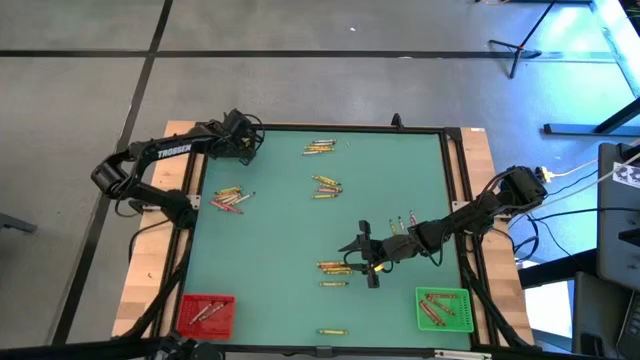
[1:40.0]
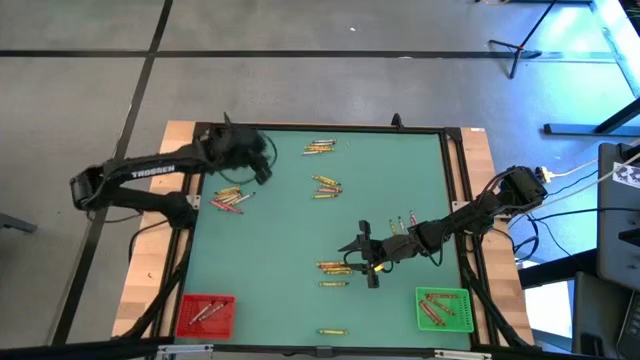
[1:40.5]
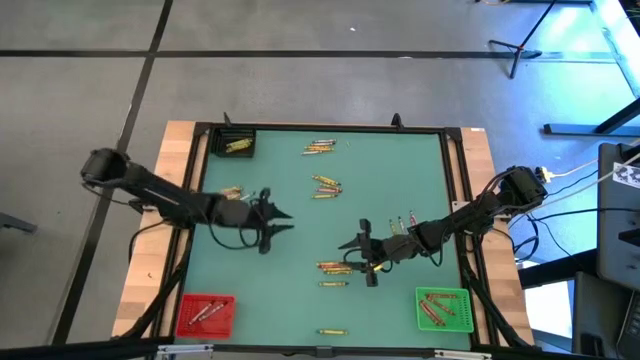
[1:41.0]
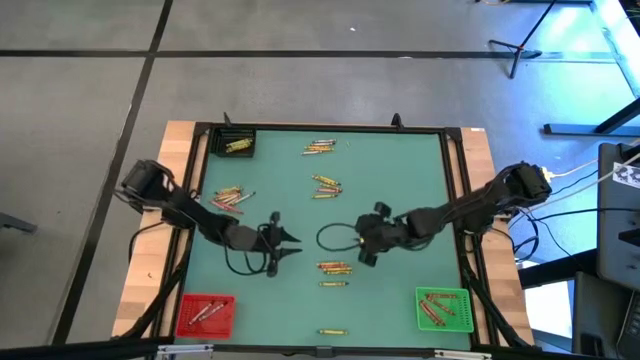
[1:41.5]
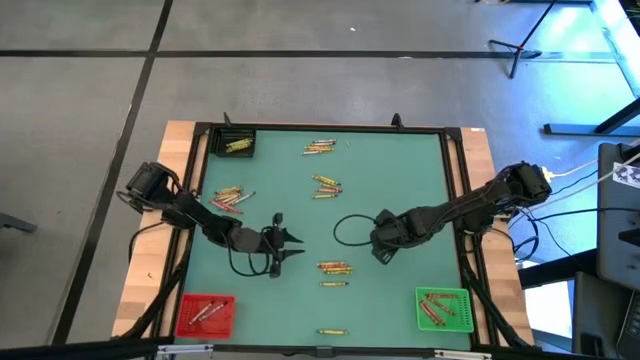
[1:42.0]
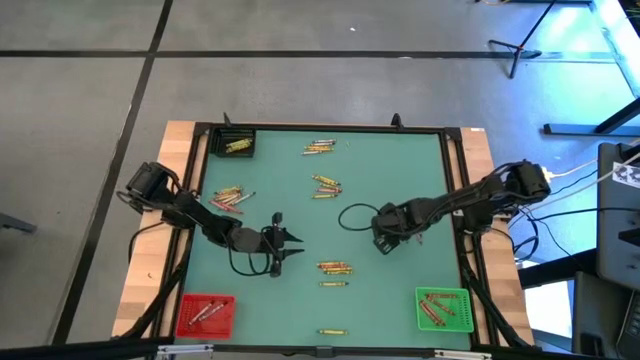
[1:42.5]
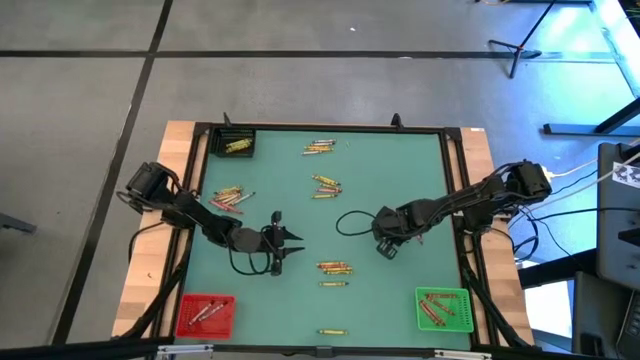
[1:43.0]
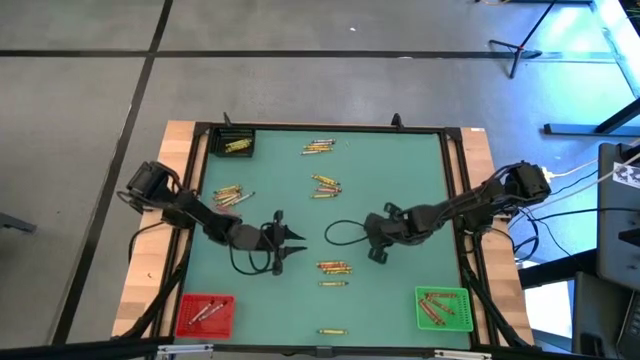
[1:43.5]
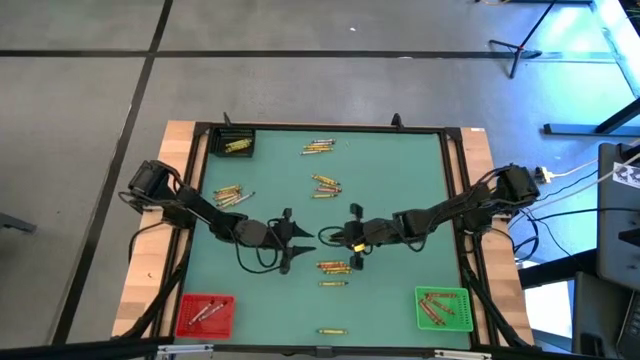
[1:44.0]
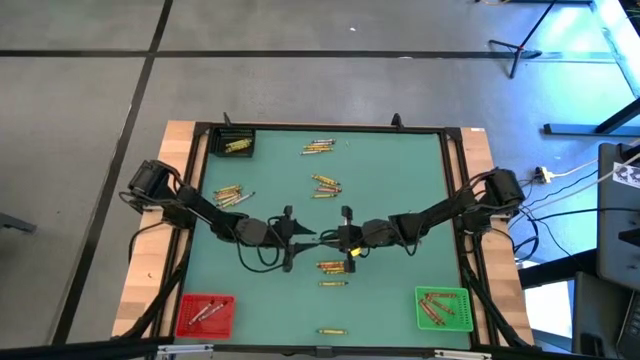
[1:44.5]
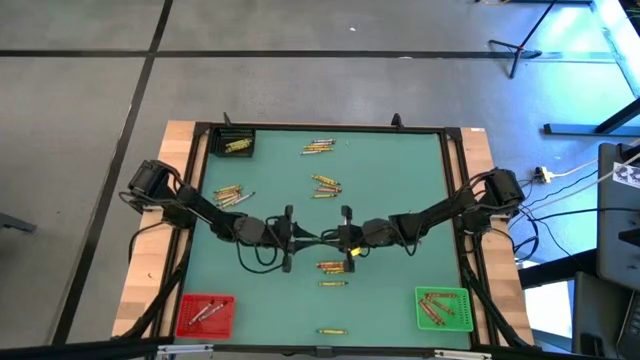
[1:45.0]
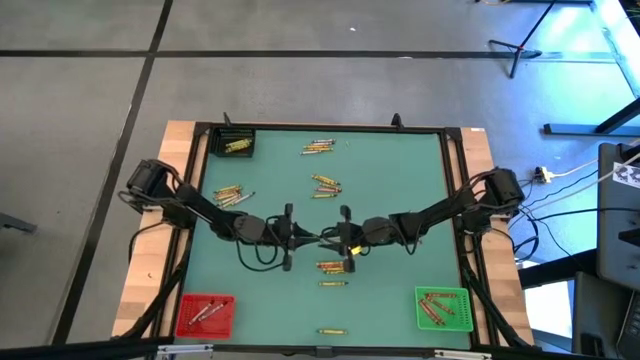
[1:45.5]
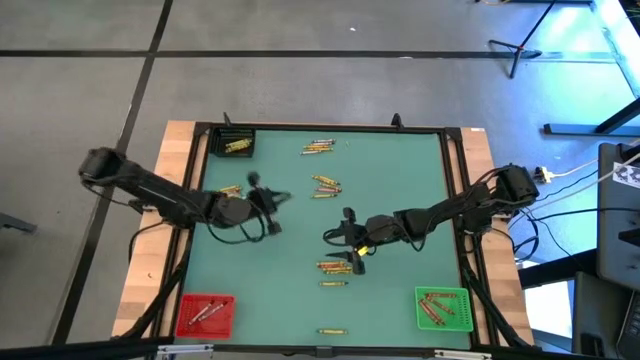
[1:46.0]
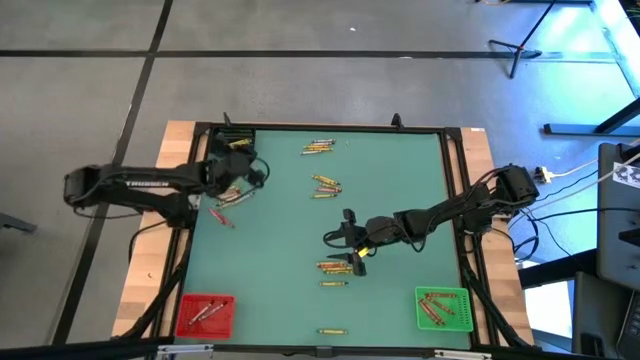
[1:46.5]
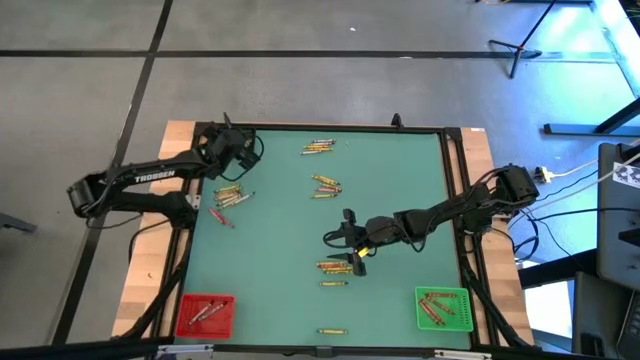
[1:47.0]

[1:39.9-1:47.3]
Task: Sort crayons
Put the green crayon into the black bin

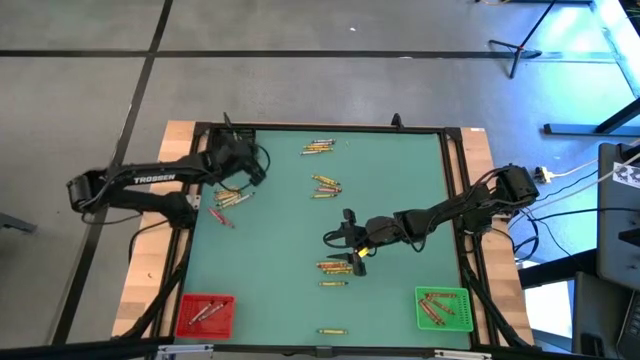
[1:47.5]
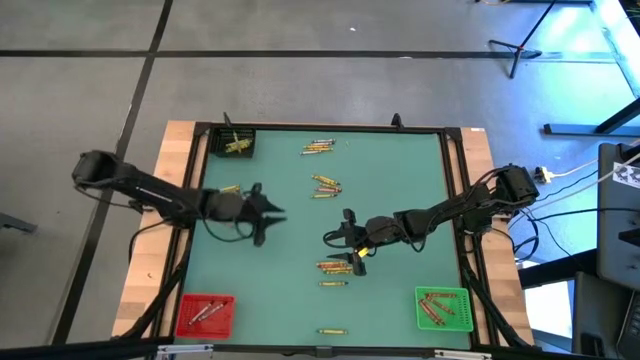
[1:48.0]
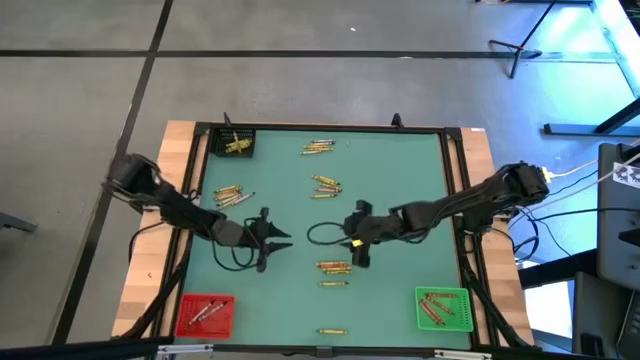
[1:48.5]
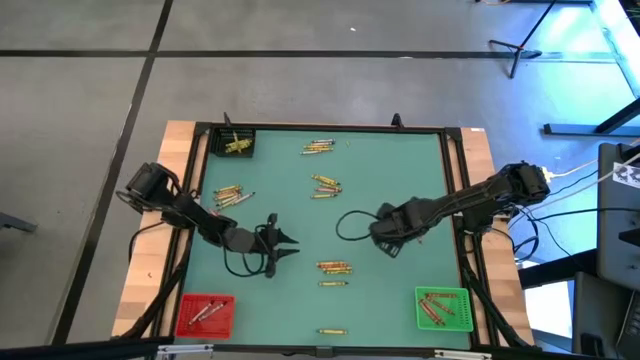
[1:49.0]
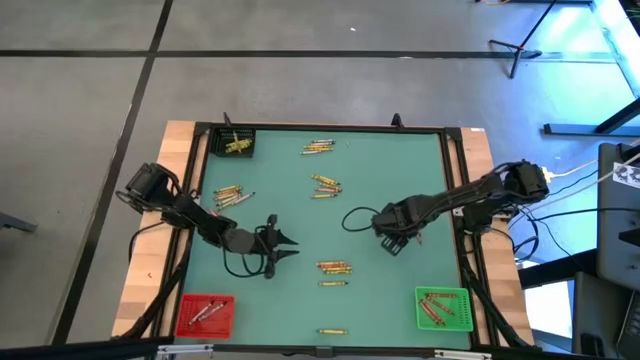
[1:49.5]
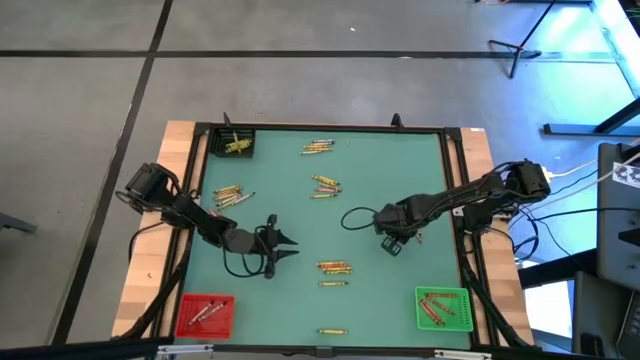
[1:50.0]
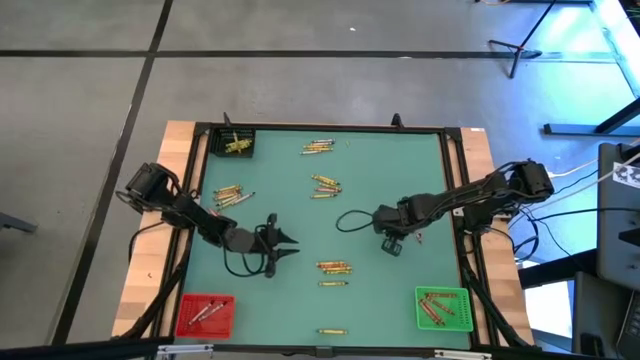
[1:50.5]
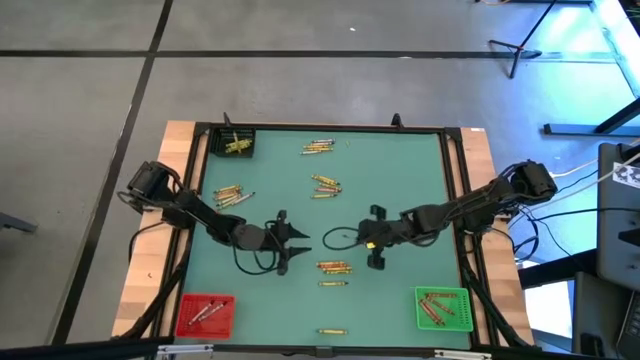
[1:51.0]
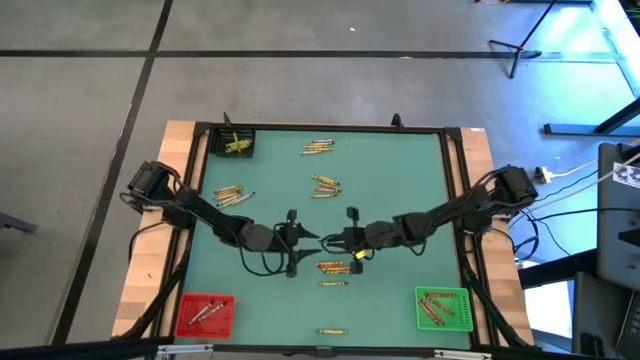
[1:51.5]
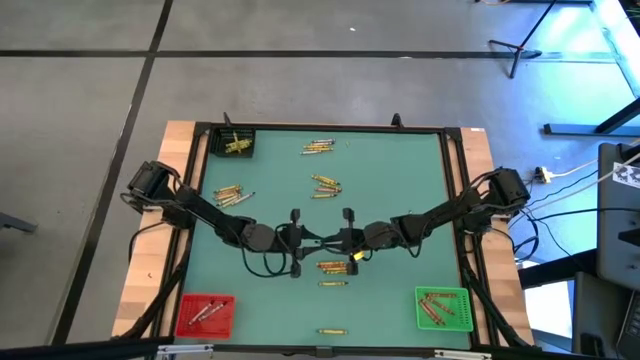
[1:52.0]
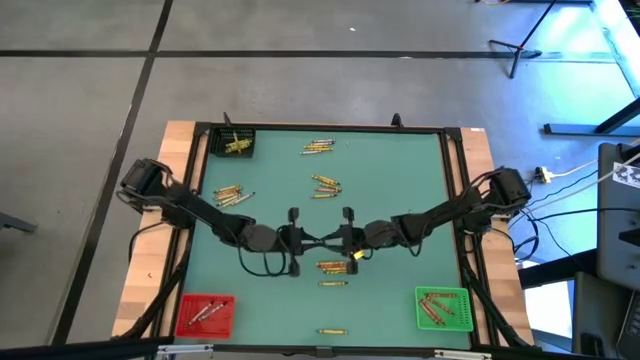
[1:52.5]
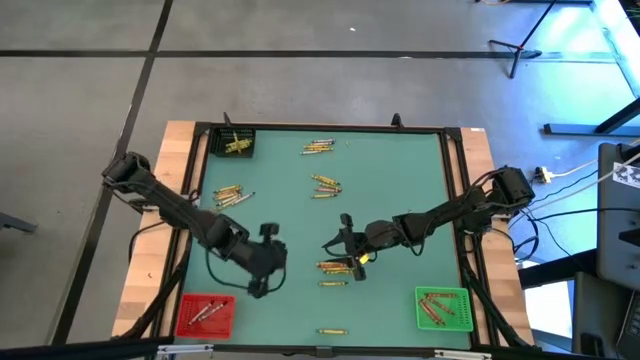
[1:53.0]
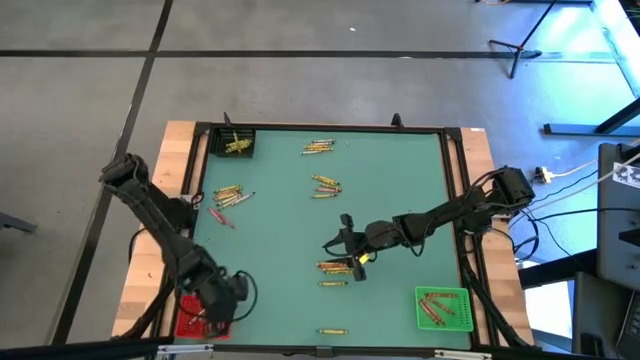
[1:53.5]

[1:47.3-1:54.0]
Put the black crayon into the red bin

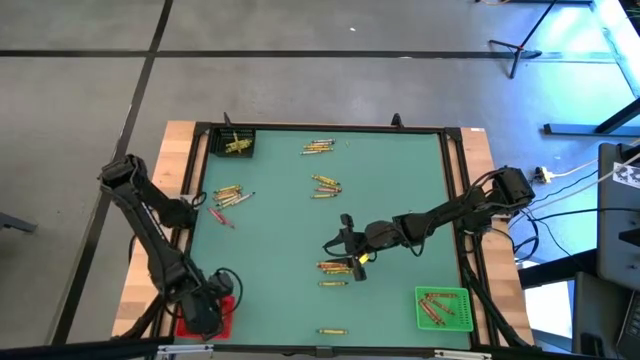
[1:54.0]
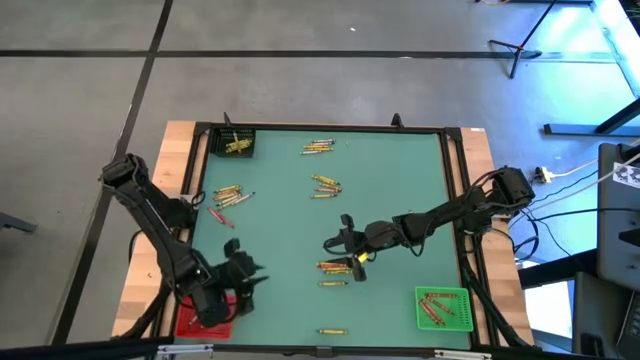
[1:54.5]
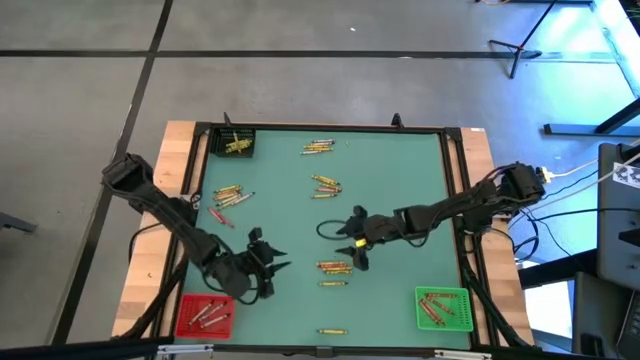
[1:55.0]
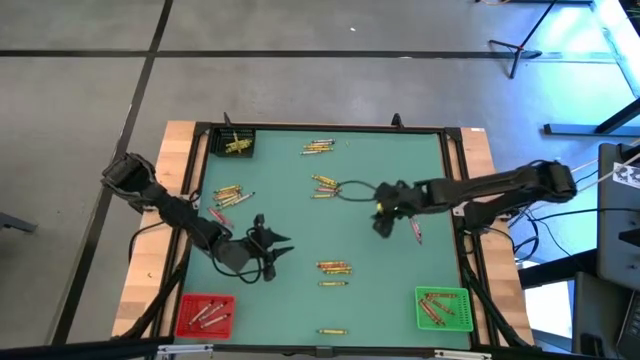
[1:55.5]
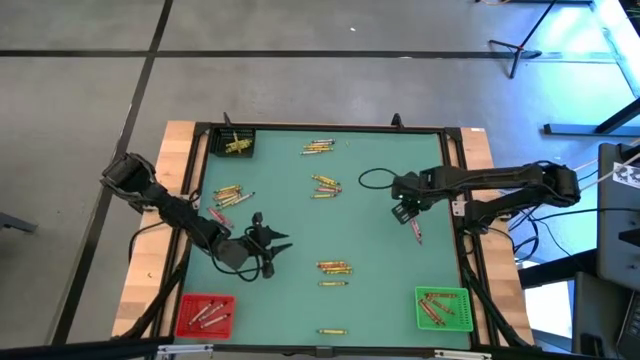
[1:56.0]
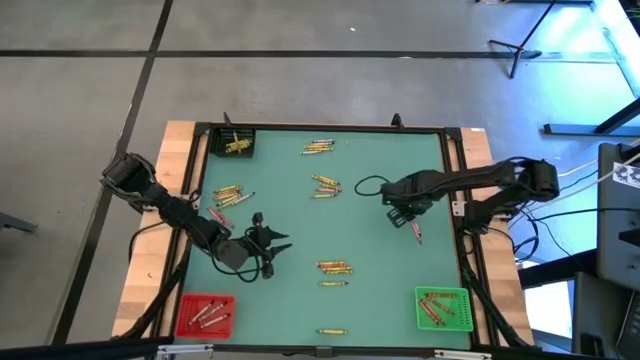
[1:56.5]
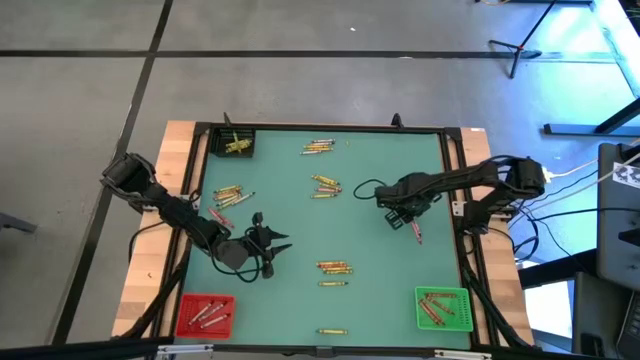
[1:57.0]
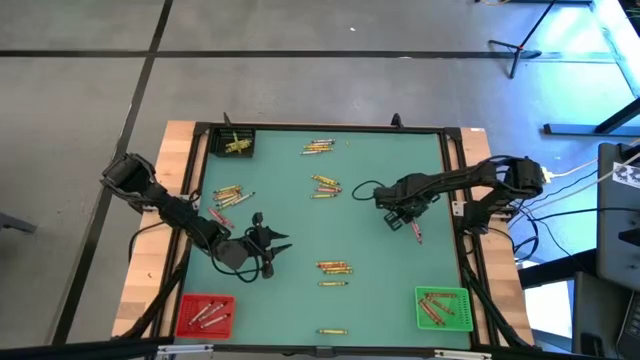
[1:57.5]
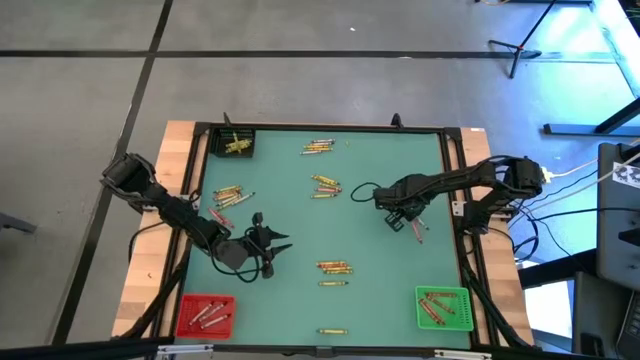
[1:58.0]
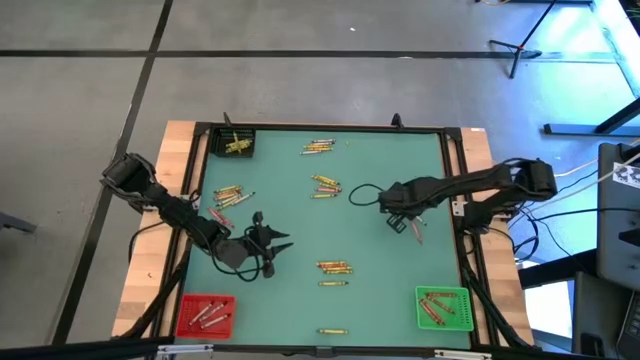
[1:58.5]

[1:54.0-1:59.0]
Put the black crayon into the red bin

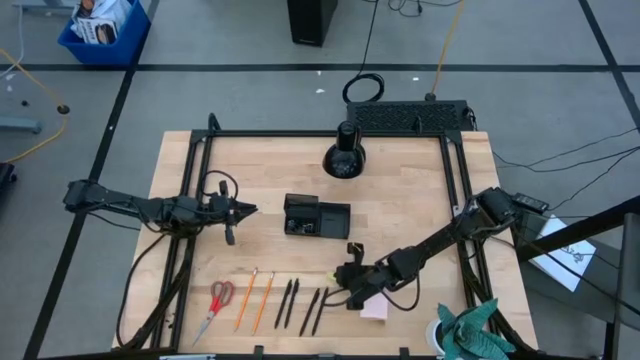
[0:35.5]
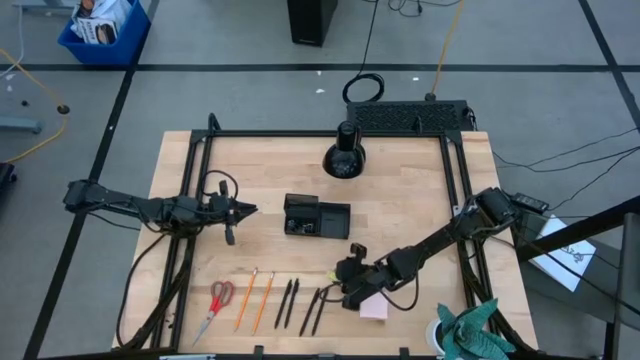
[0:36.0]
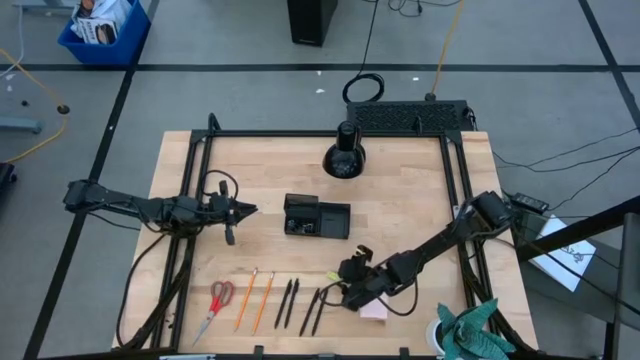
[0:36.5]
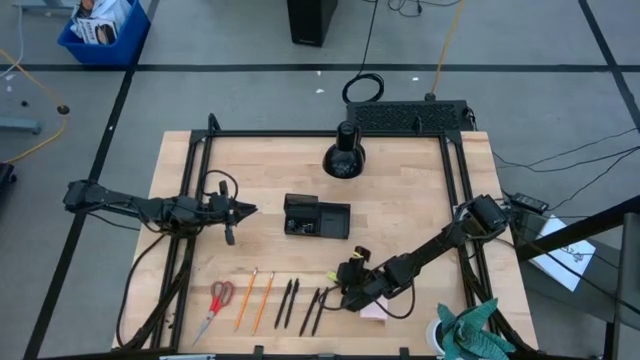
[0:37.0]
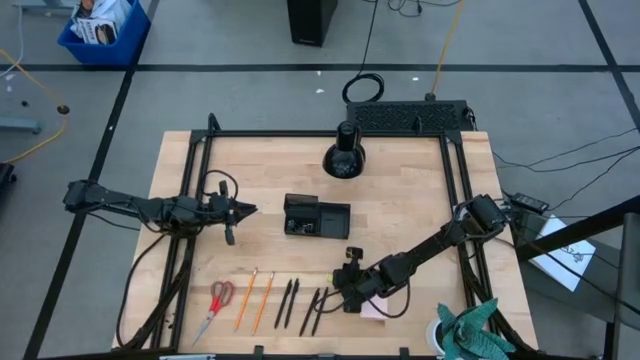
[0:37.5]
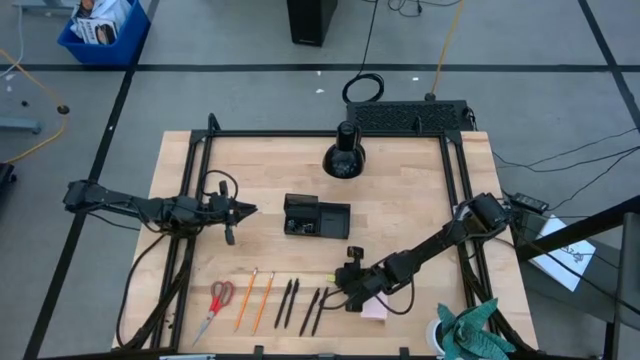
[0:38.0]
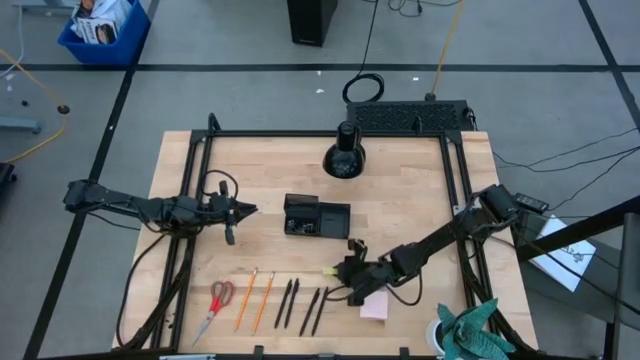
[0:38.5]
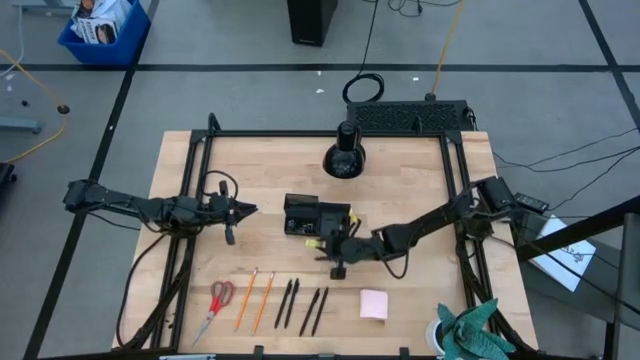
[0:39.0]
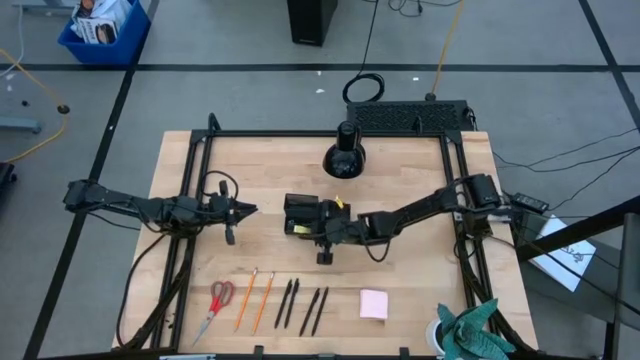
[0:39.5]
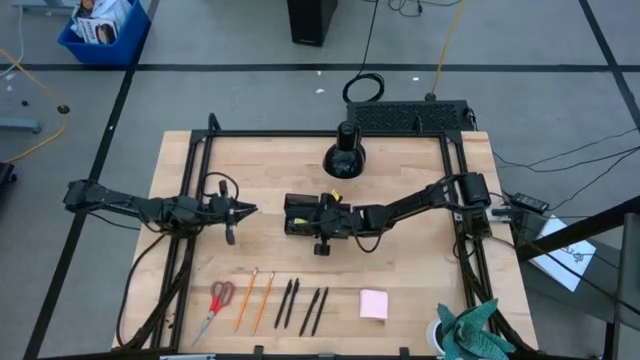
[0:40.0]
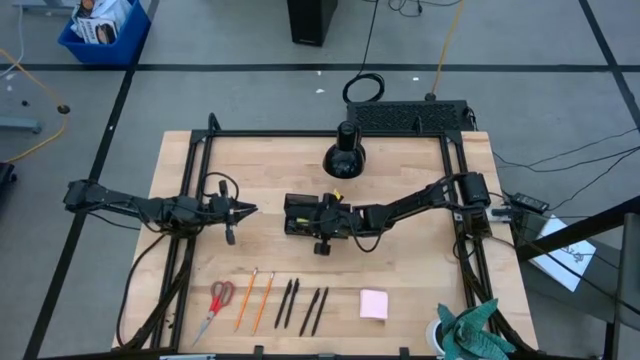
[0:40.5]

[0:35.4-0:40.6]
Task: Pick and place office supplies into organizer
Put the eraser into the desk organizer
